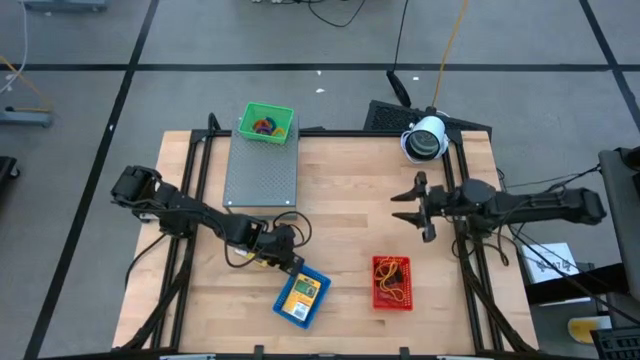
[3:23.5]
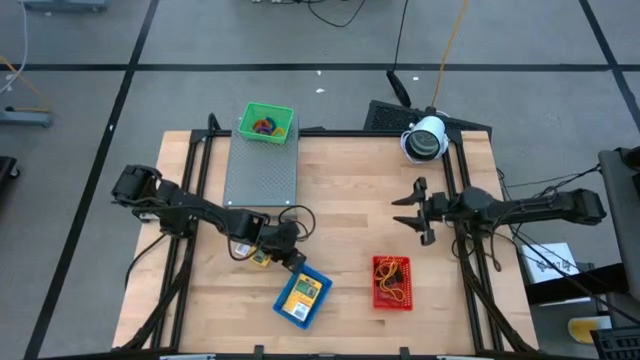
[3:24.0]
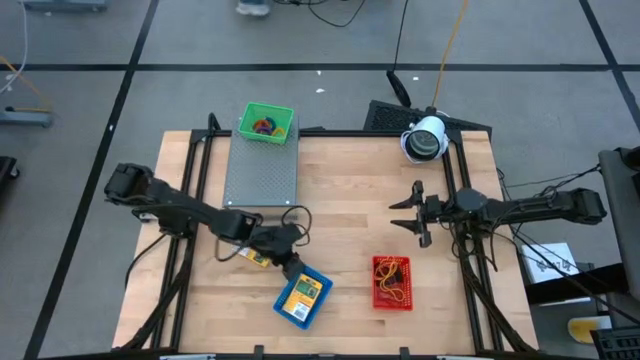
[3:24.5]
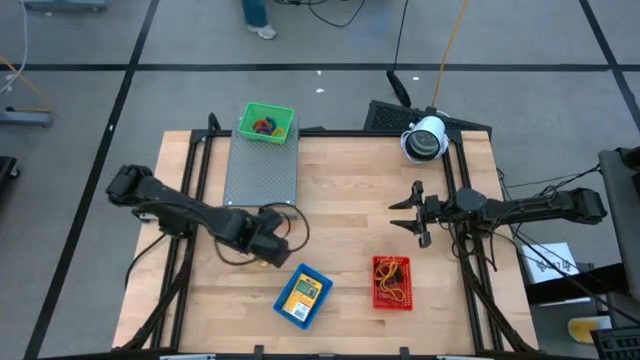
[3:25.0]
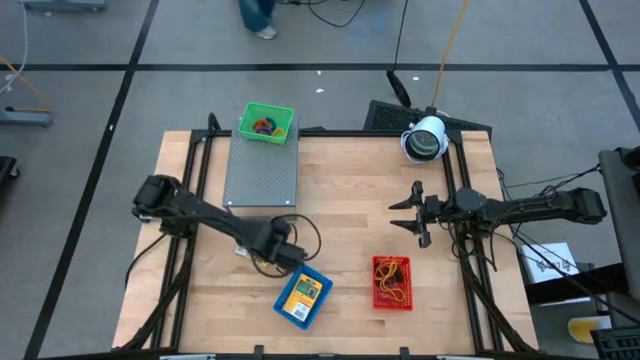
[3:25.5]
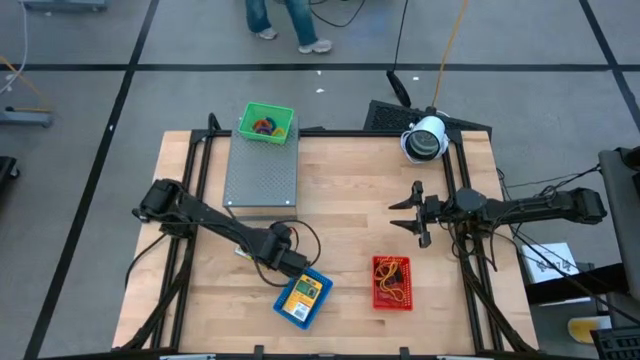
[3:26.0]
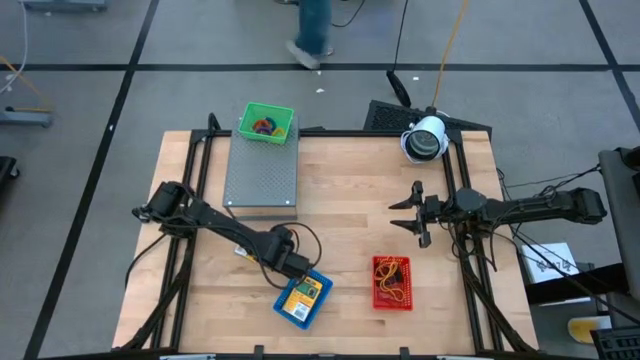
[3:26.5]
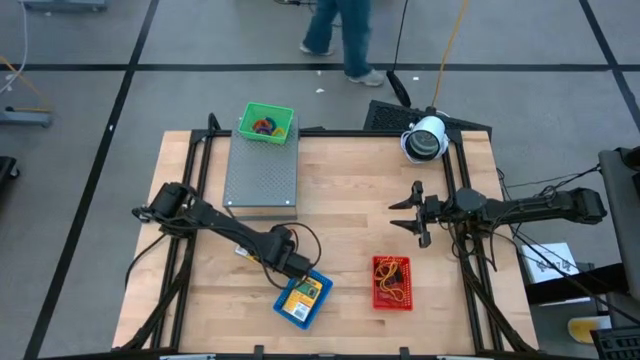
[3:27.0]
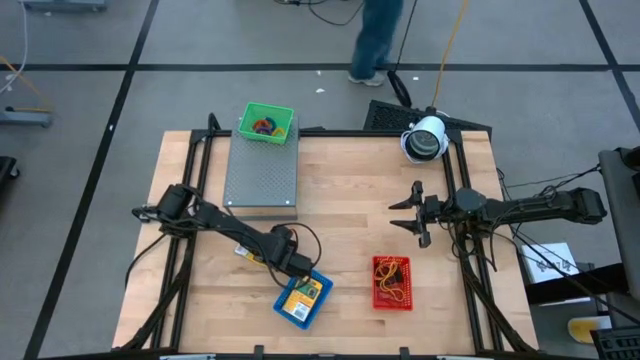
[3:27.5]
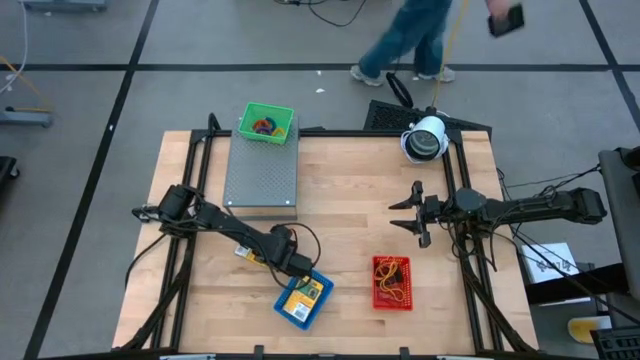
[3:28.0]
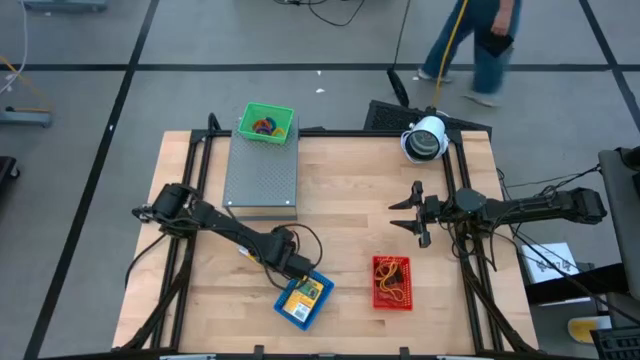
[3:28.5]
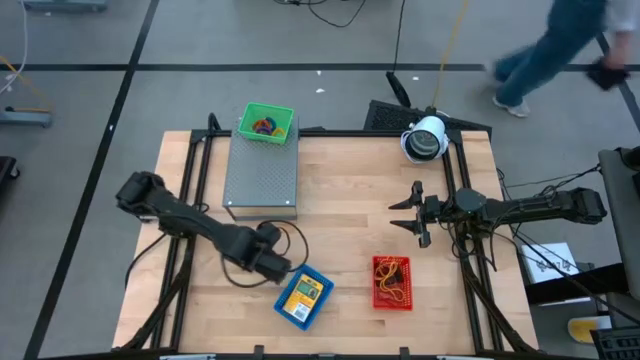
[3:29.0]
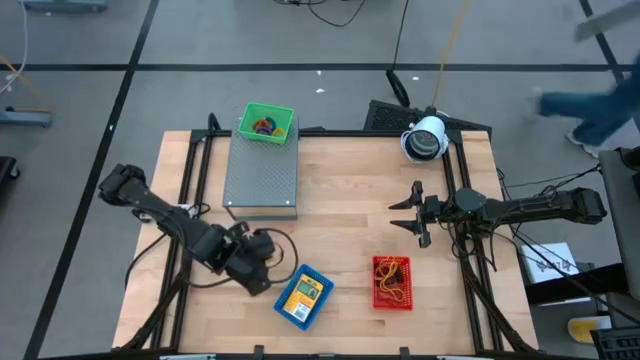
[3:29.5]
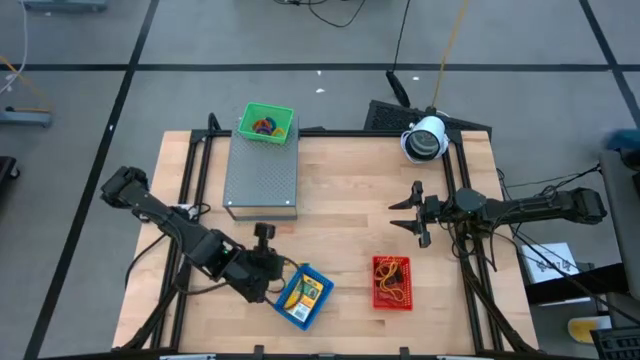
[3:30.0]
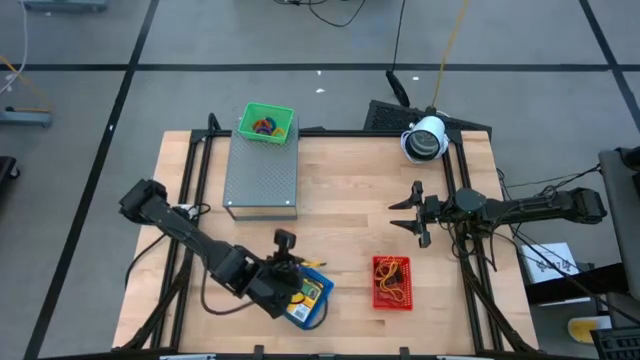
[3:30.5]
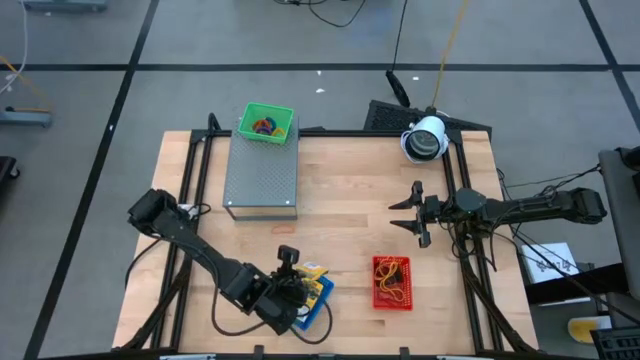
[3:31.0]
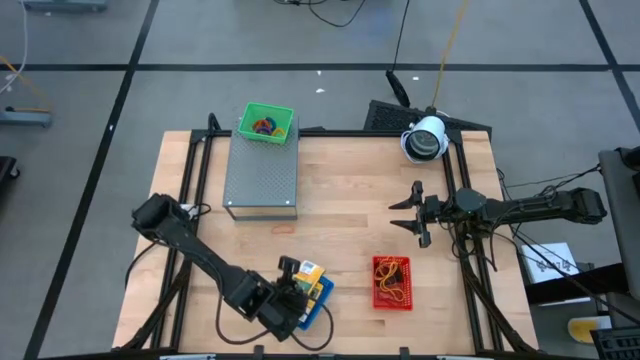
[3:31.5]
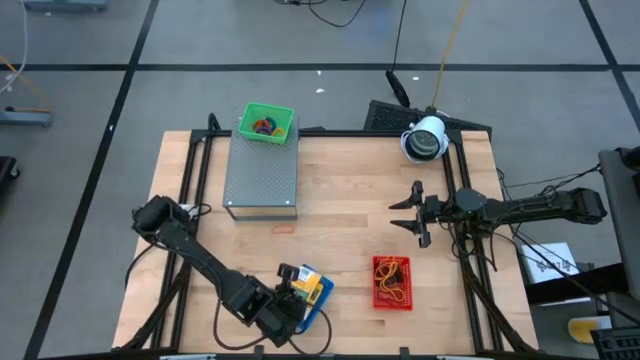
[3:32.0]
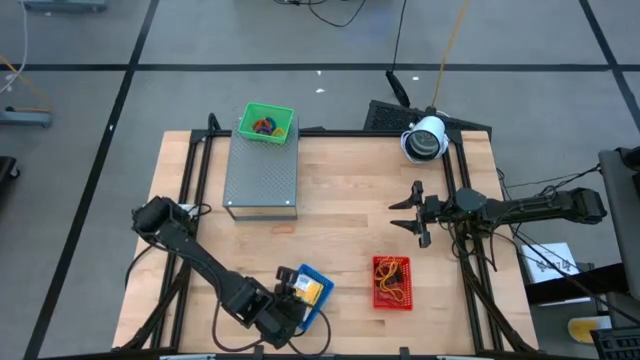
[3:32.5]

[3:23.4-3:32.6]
Task: Pick & Place Office Desk Supplies
Put the crayon into the blue bin

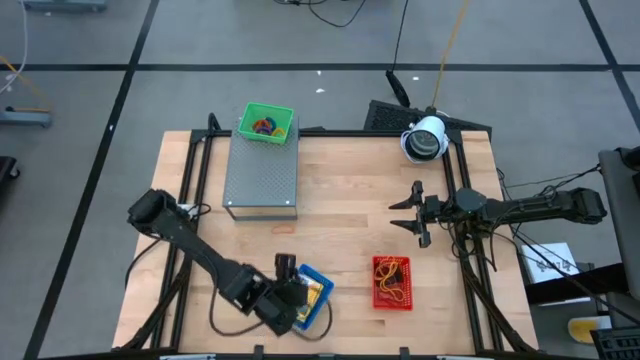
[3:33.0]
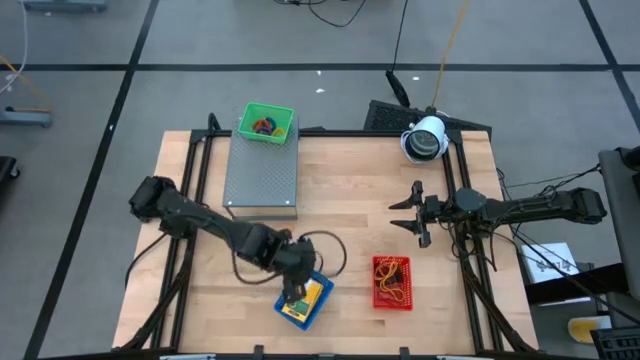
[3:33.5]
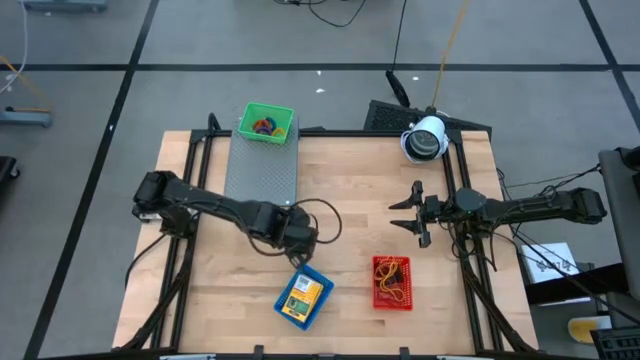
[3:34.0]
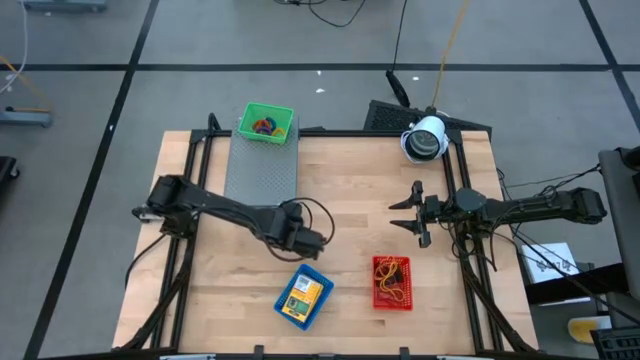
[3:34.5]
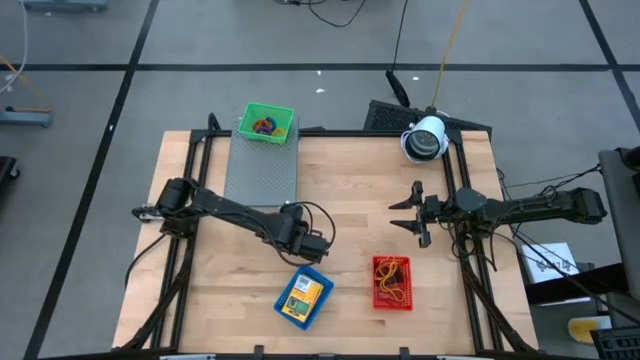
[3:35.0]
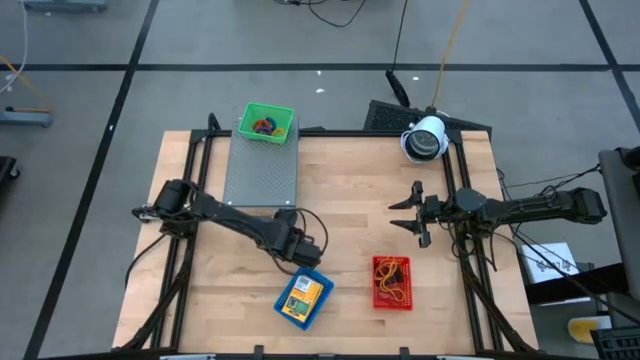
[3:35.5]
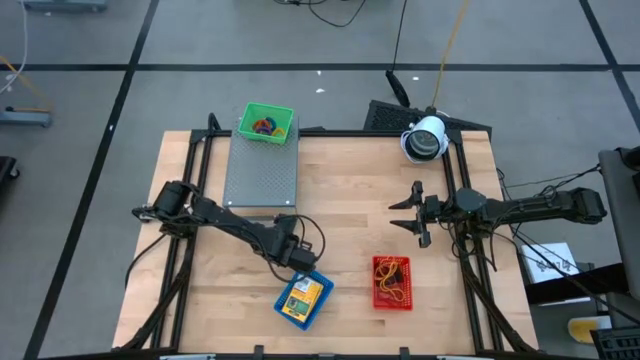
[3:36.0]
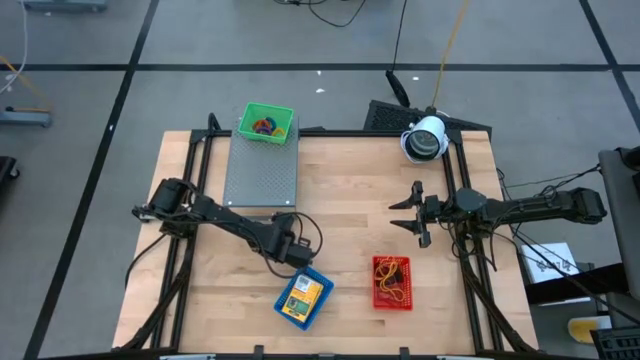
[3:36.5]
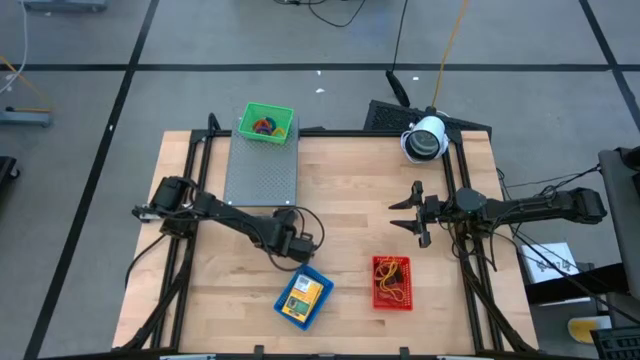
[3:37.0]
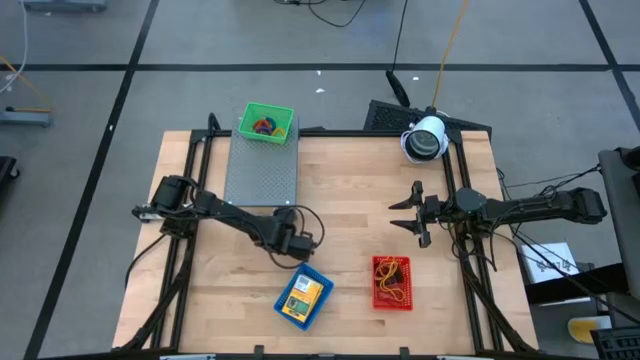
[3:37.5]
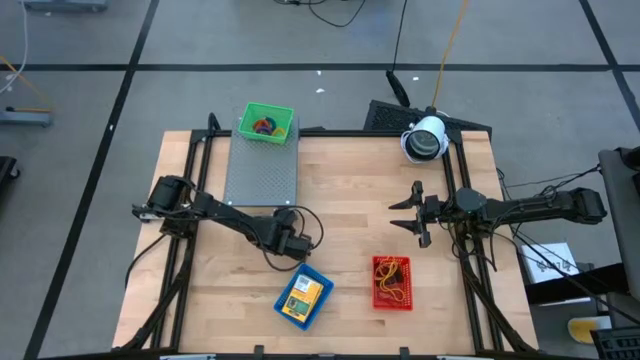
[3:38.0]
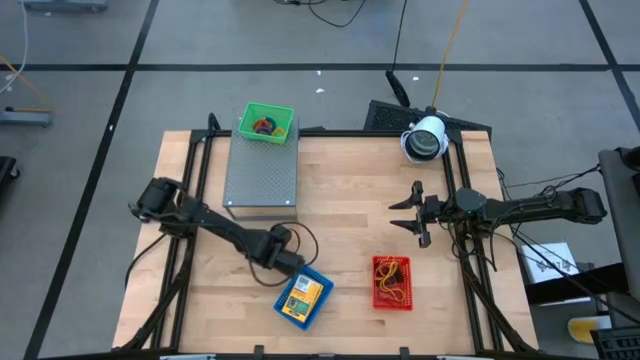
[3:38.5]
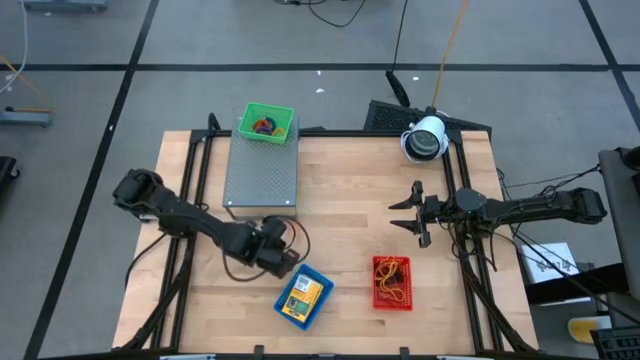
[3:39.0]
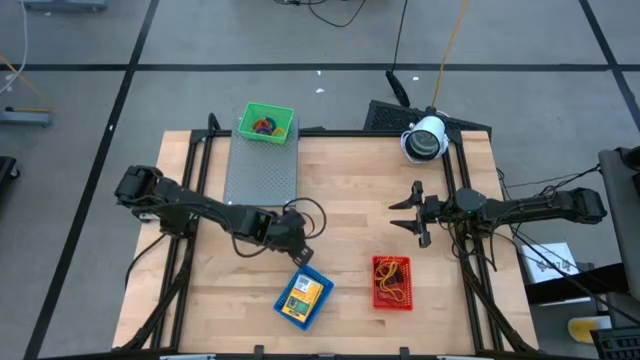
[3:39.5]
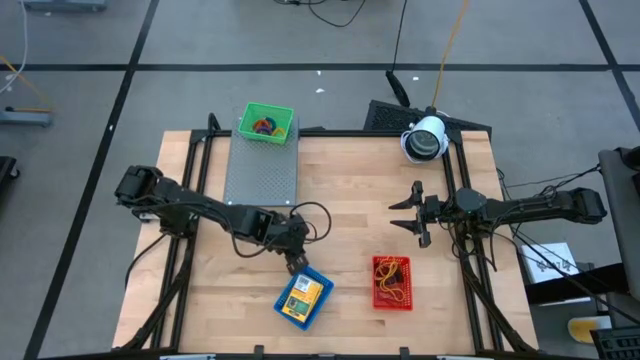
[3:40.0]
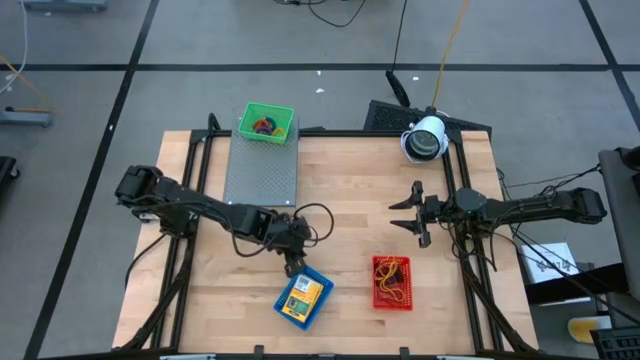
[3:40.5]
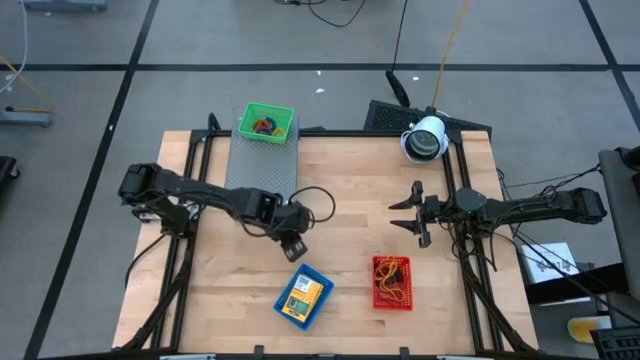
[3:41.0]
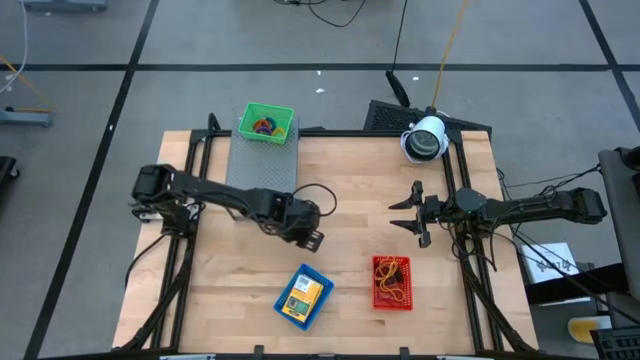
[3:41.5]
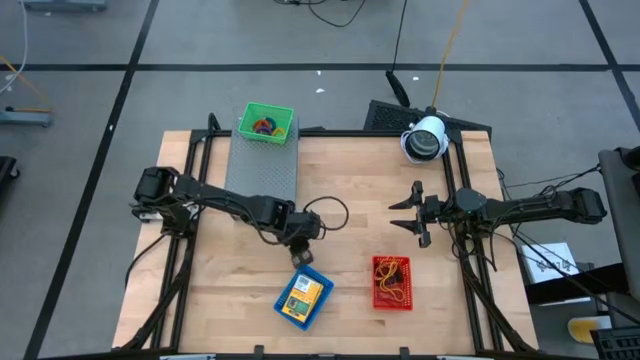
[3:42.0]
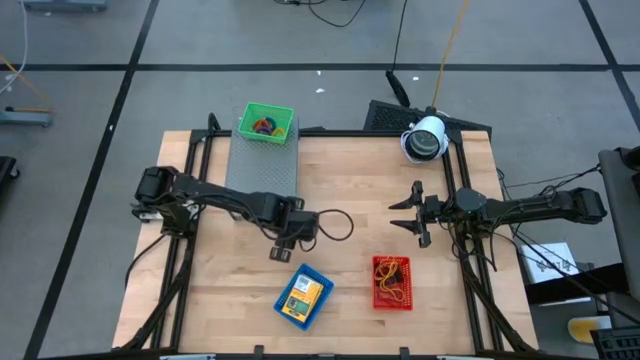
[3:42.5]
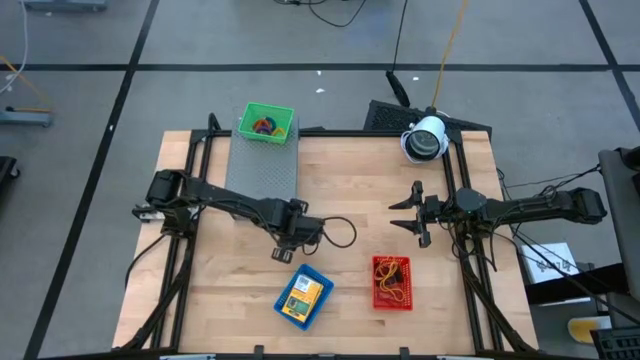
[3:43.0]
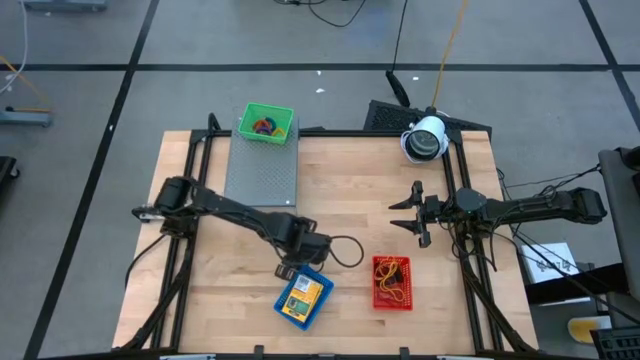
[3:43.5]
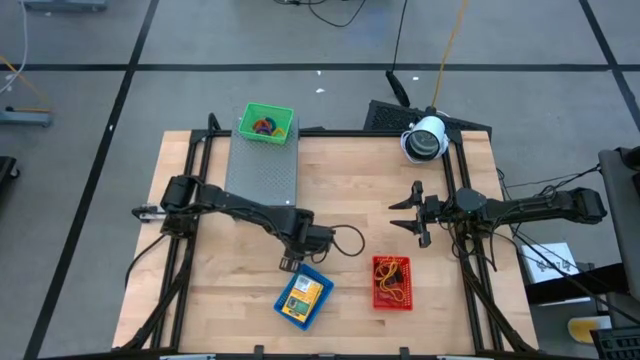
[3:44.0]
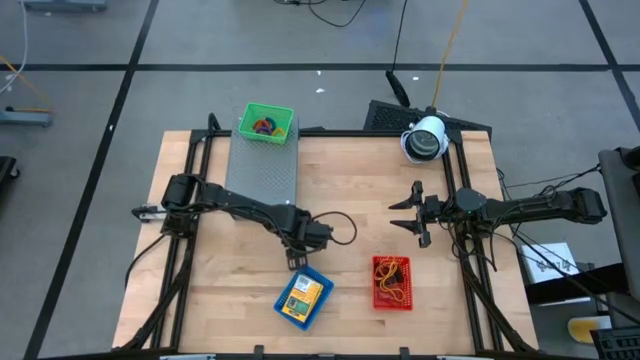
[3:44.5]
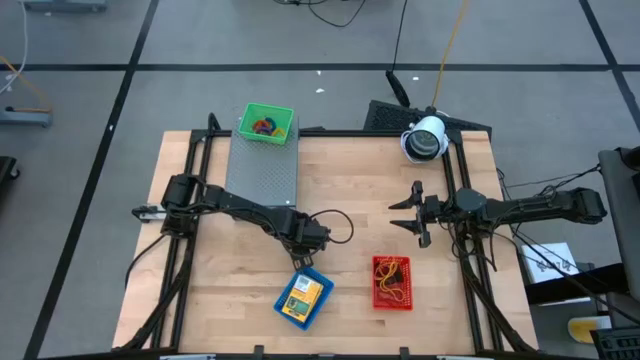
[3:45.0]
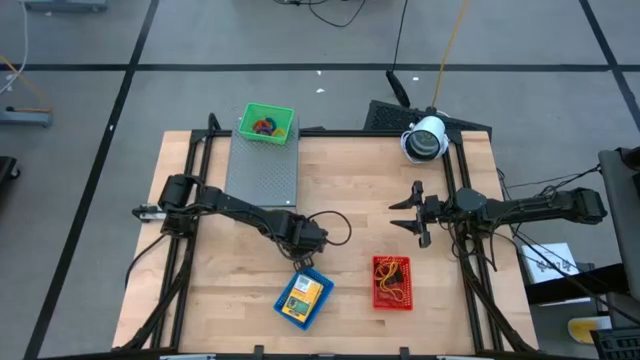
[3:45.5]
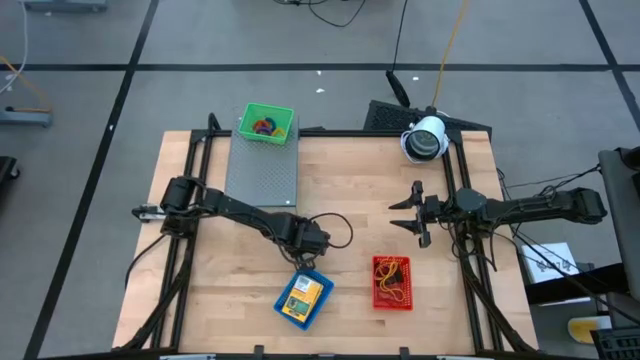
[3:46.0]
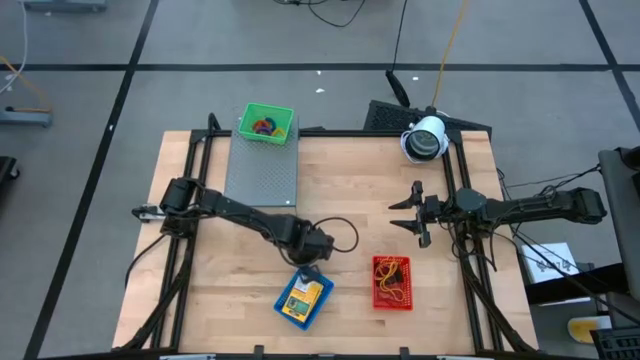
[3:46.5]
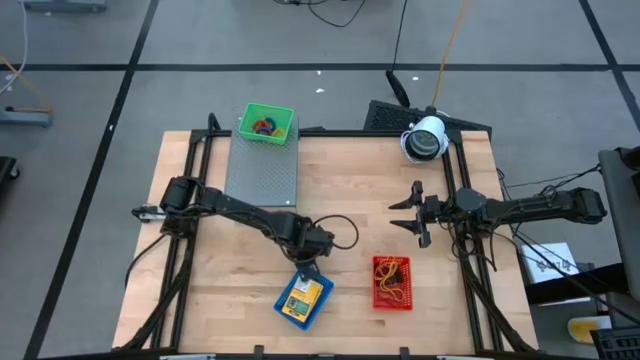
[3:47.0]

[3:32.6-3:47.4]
Put the orange rubber band into the red bin
